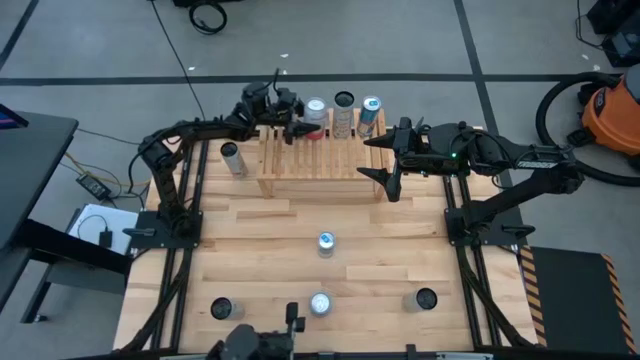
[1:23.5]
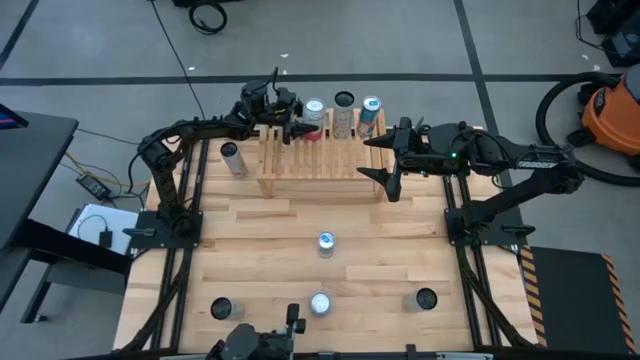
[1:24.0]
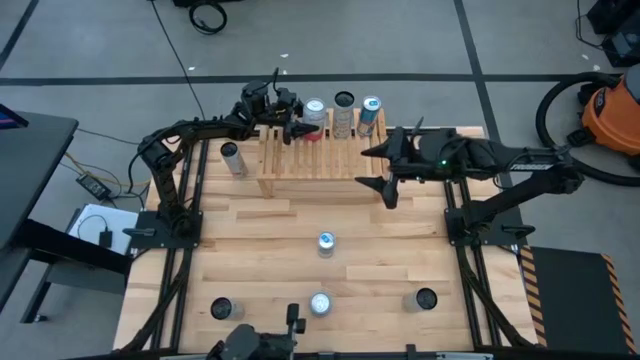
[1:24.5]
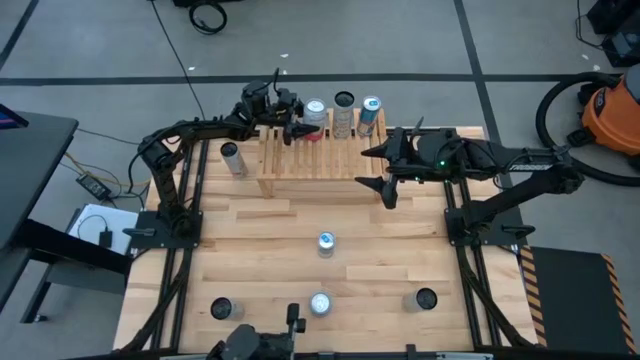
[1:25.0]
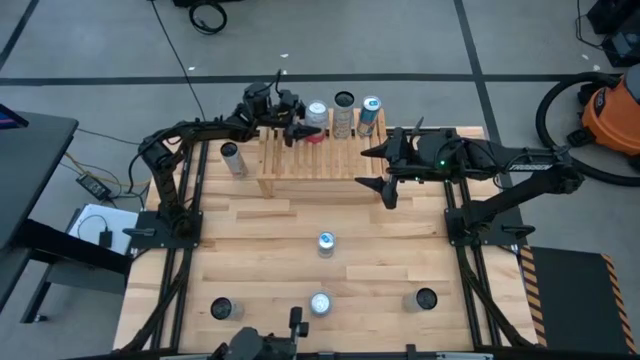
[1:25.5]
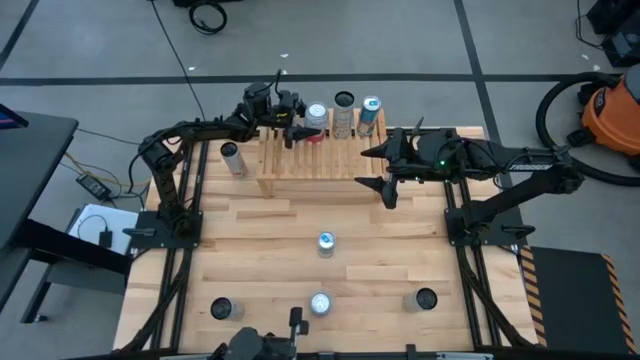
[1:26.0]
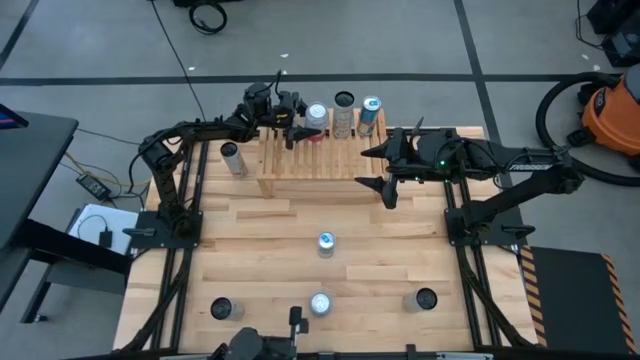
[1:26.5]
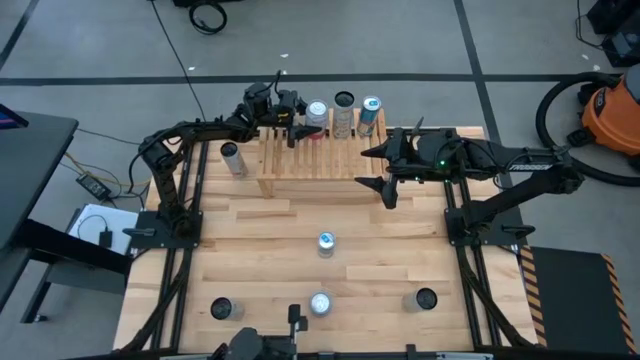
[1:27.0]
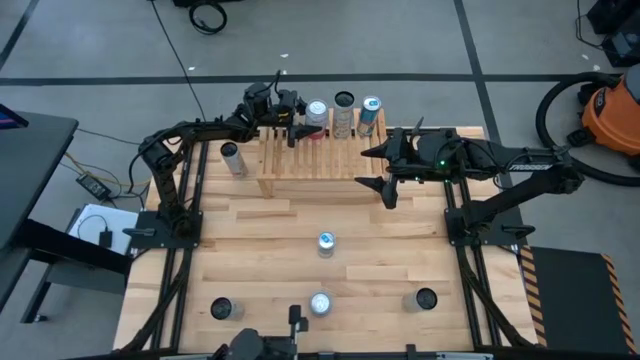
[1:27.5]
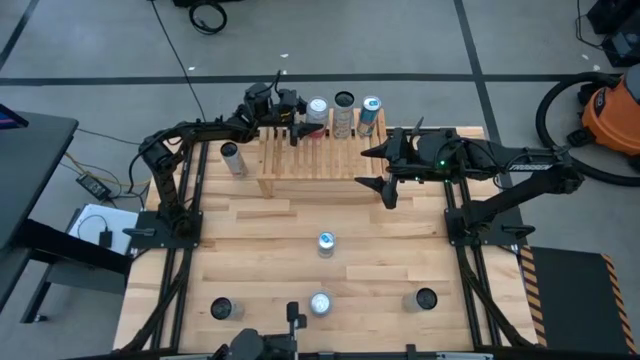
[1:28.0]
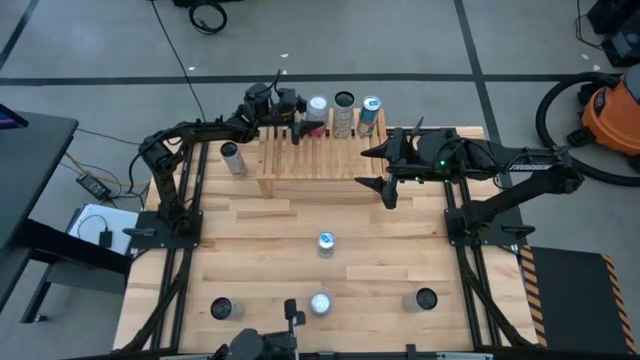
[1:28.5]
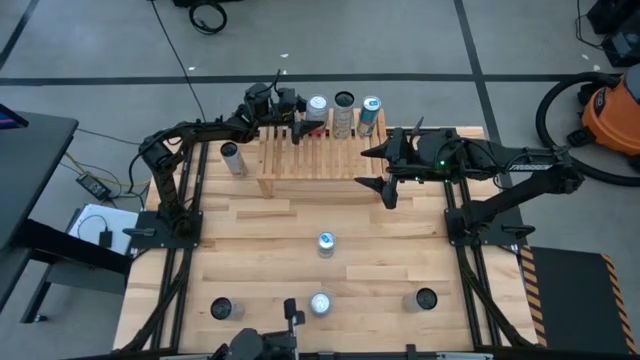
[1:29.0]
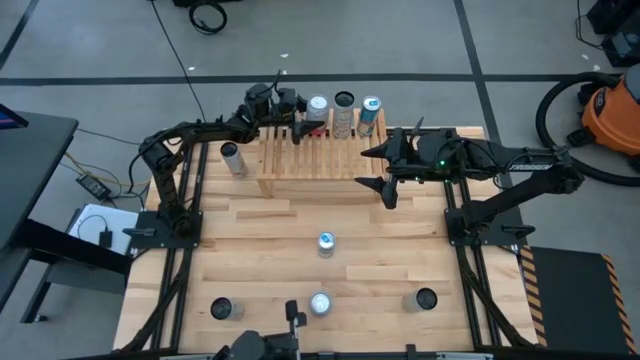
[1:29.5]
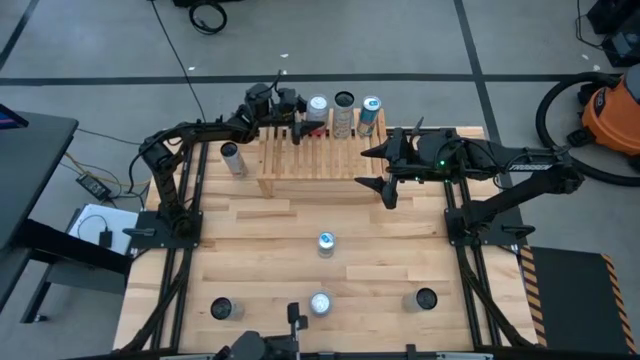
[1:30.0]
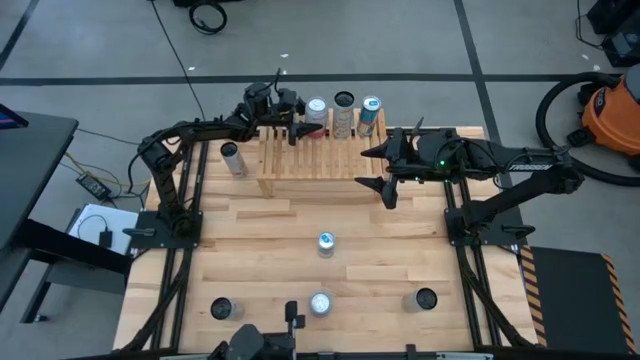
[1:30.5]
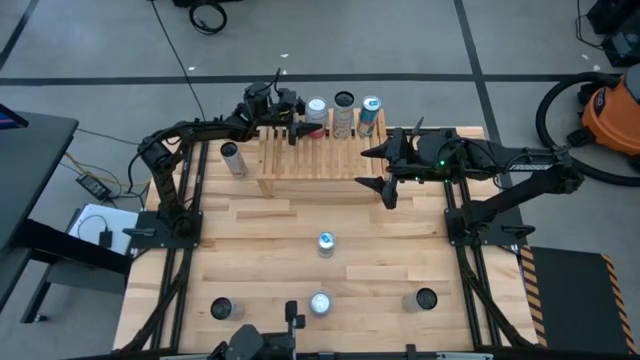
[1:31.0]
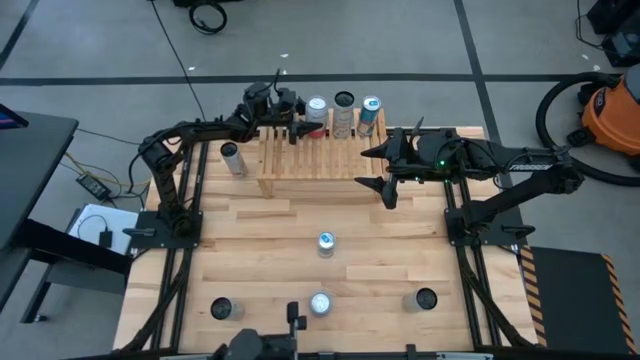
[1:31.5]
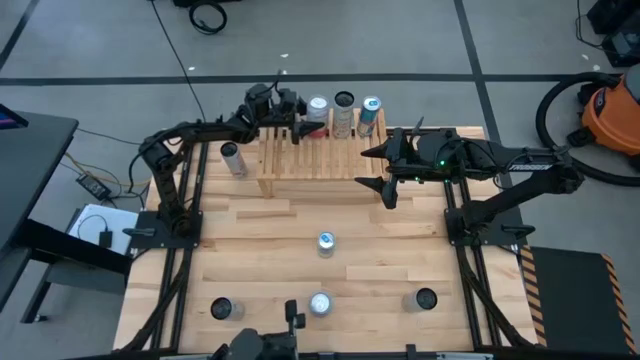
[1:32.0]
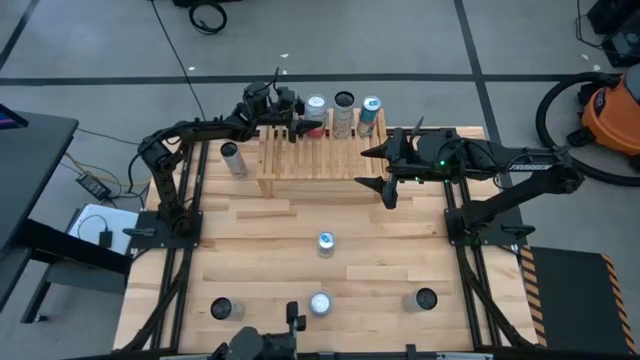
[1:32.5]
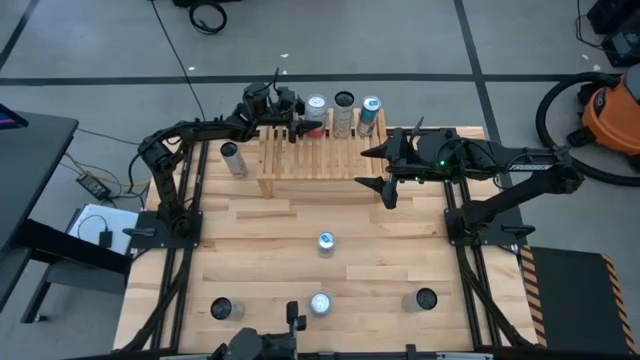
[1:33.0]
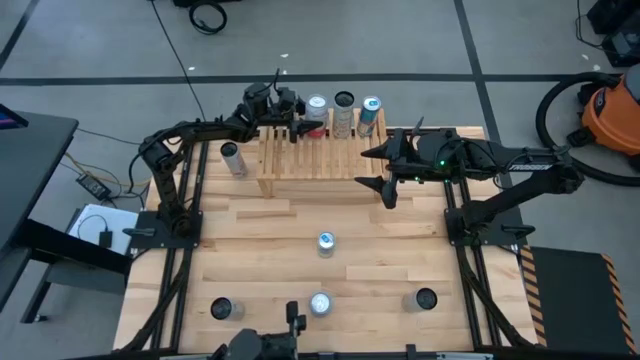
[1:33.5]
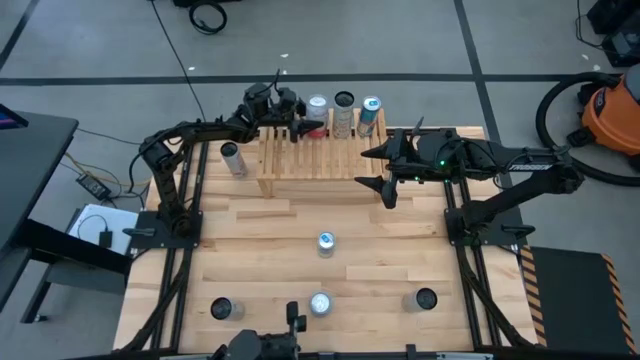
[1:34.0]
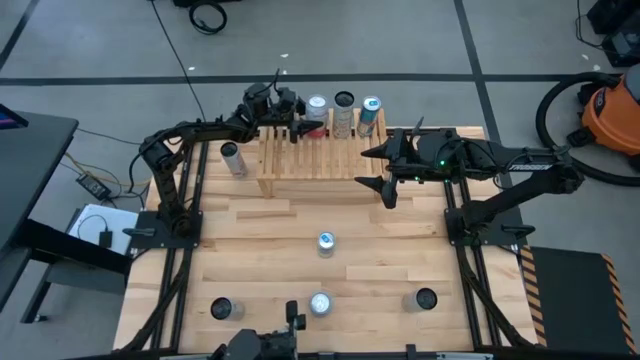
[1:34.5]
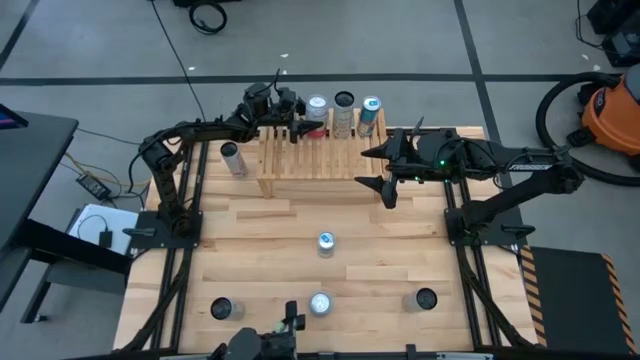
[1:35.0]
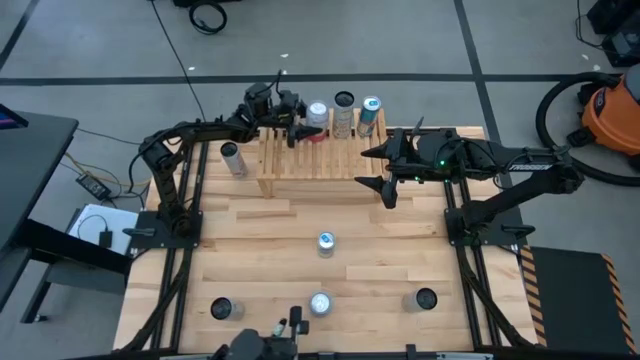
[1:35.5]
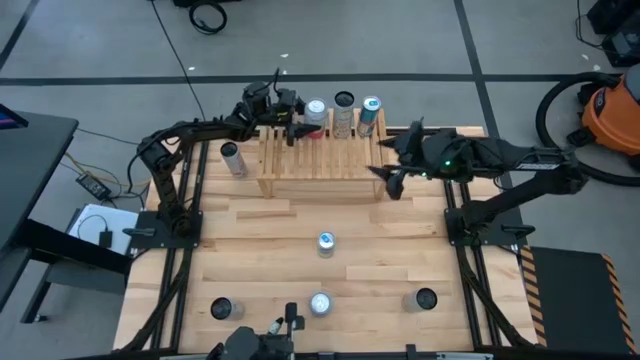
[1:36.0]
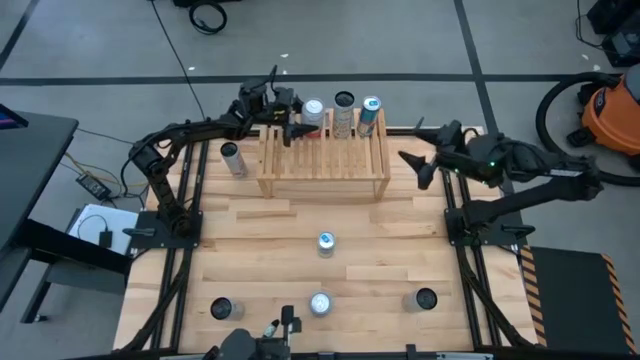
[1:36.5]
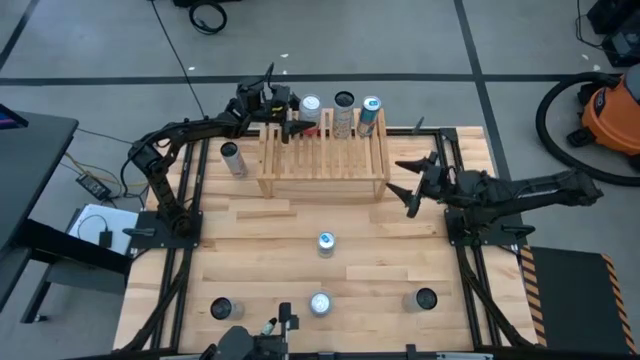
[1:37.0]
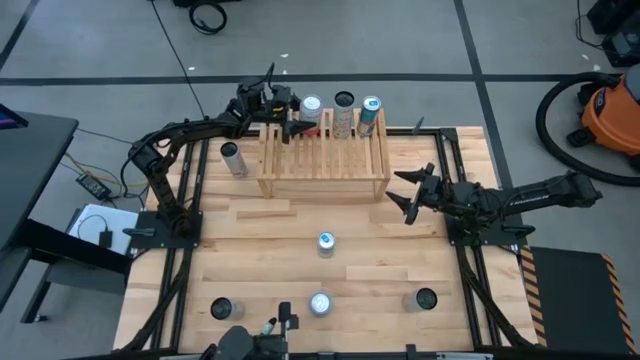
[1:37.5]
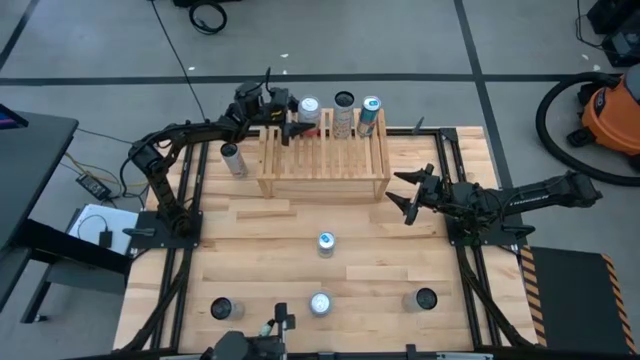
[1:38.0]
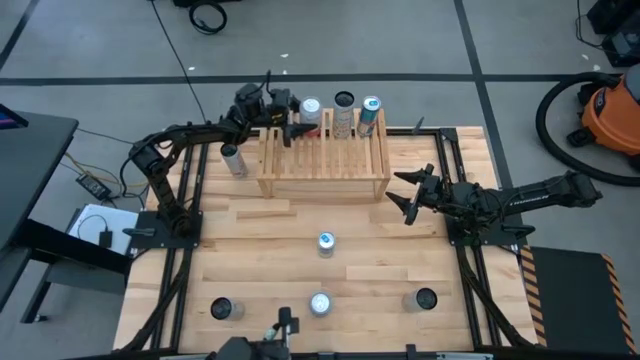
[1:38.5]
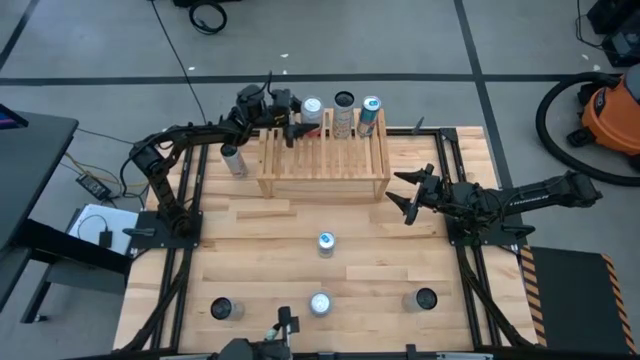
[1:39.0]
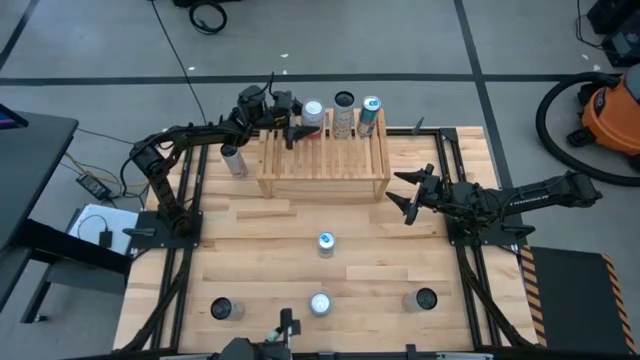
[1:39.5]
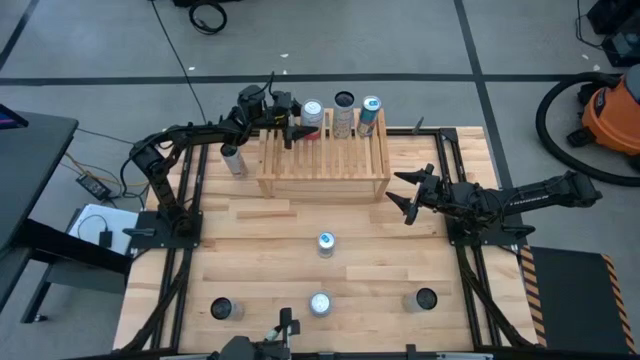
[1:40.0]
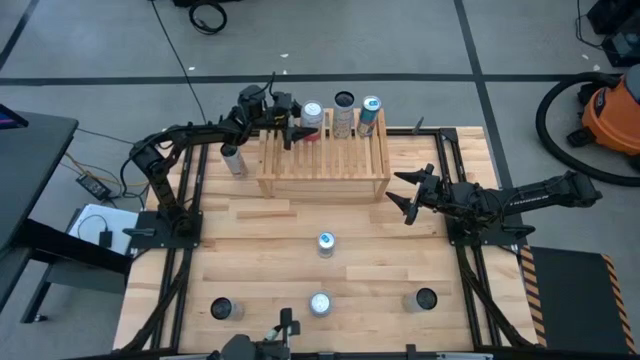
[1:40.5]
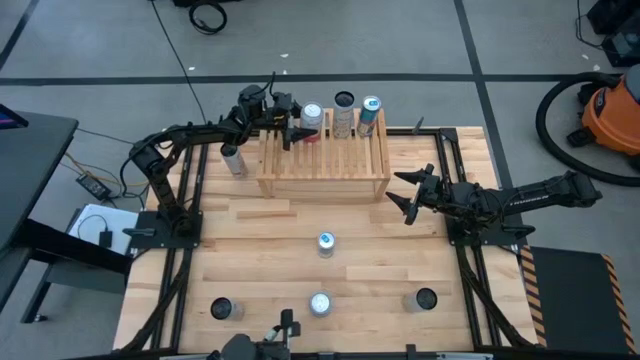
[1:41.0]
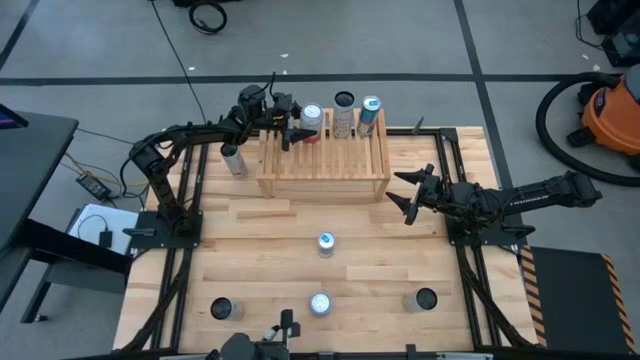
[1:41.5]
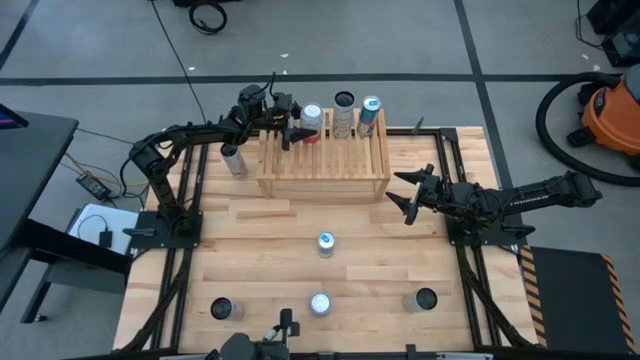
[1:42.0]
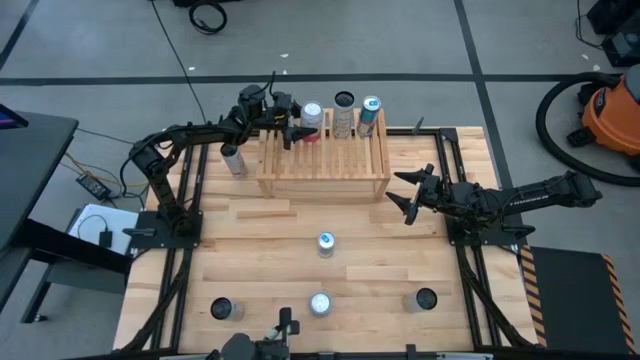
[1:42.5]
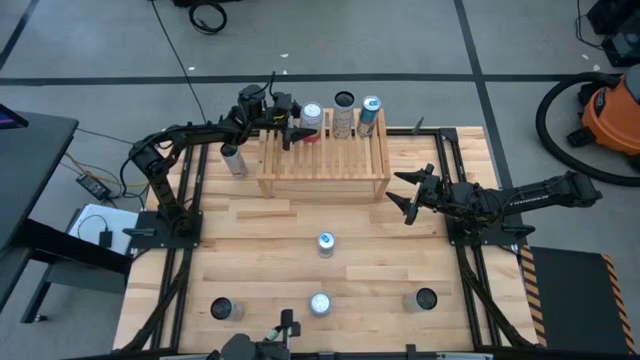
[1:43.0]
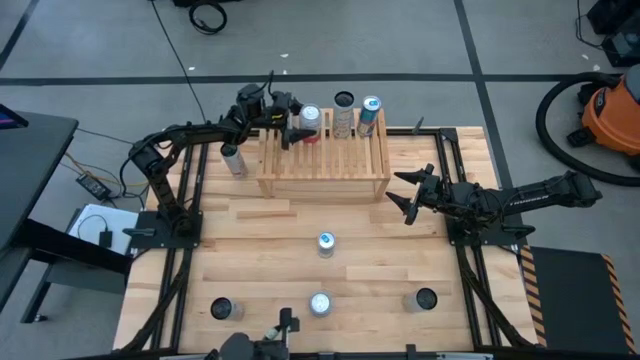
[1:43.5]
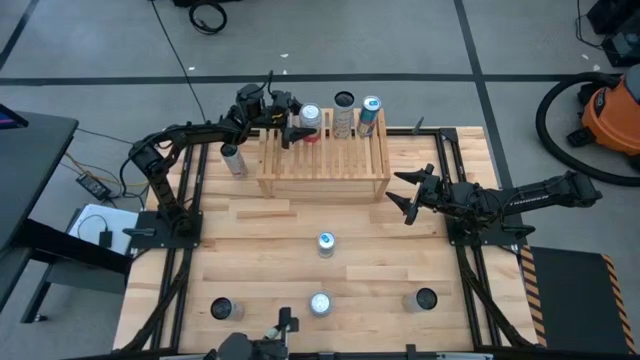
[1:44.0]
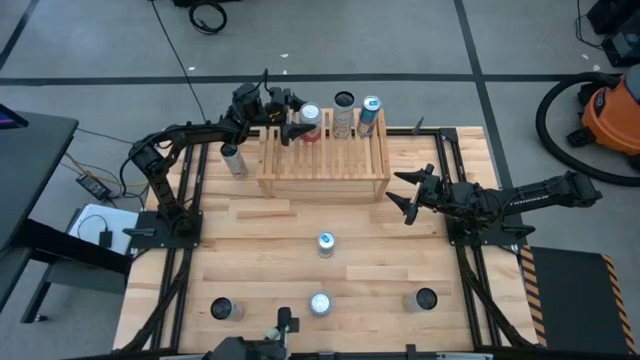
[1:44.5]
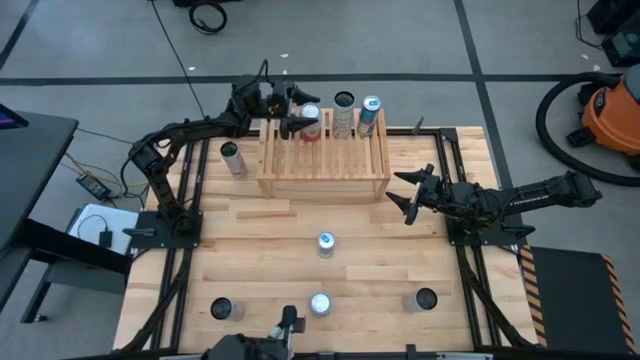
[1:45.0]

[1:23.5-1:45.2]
Task: Place canned beverage on shelf
Put the top pink and white soda can on the shelf
